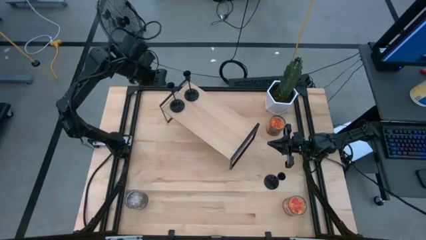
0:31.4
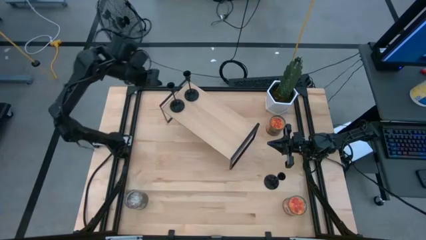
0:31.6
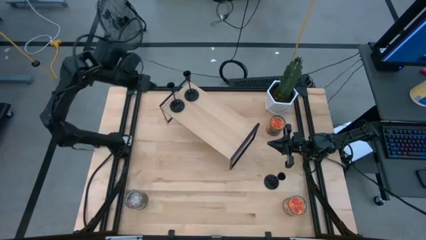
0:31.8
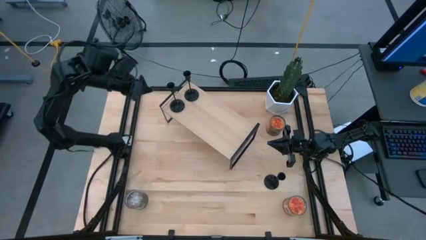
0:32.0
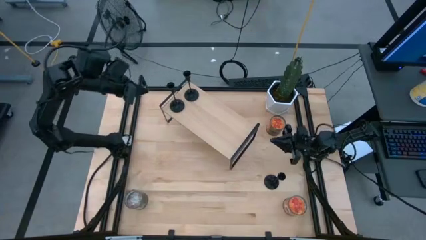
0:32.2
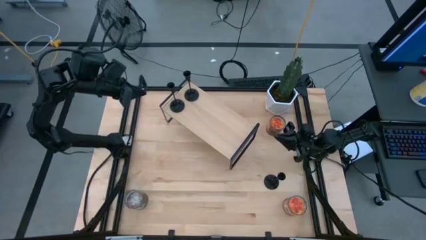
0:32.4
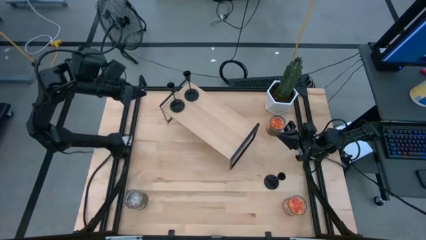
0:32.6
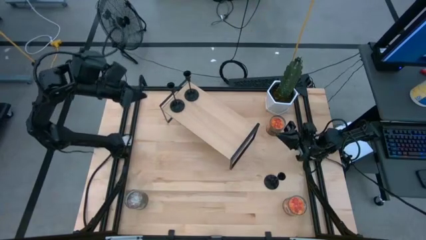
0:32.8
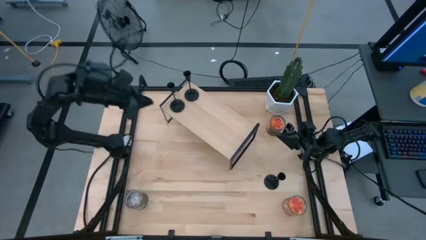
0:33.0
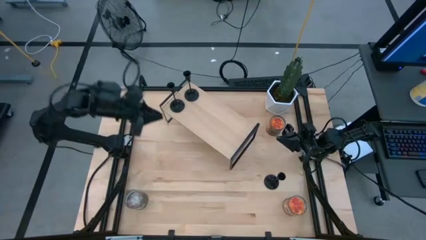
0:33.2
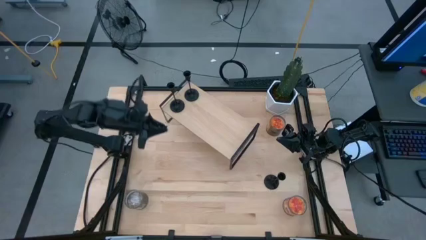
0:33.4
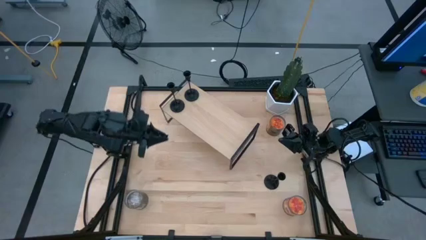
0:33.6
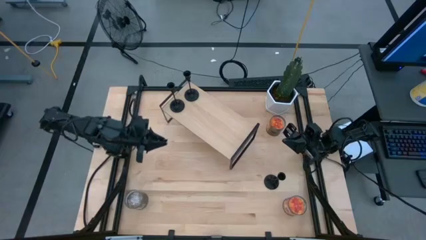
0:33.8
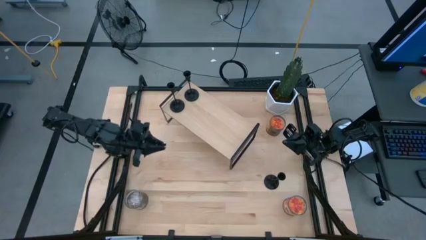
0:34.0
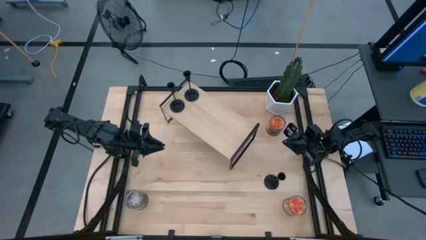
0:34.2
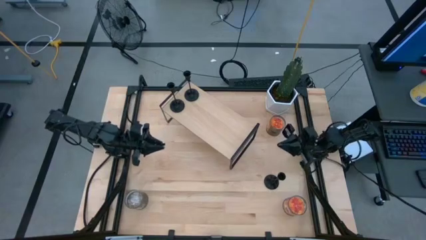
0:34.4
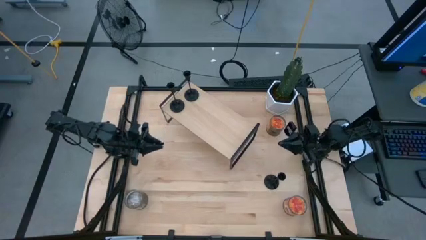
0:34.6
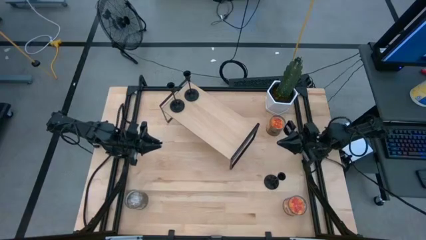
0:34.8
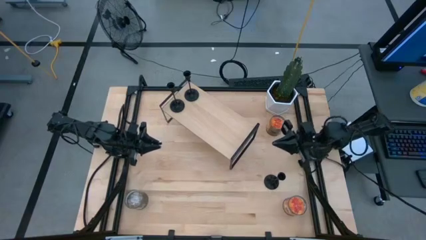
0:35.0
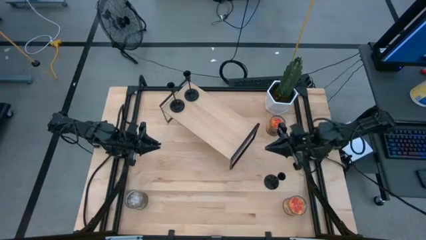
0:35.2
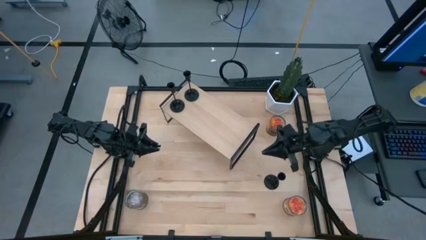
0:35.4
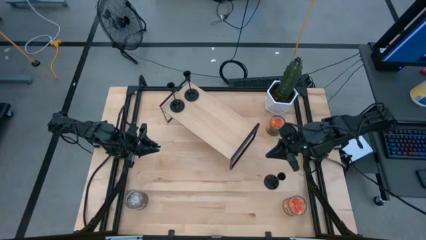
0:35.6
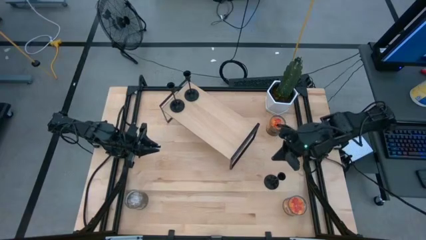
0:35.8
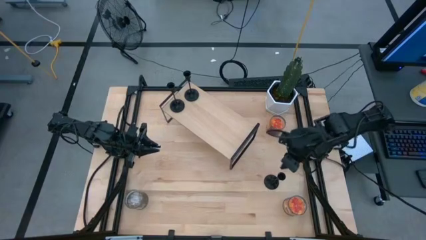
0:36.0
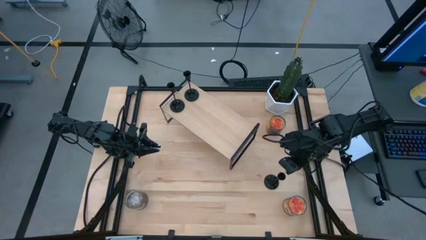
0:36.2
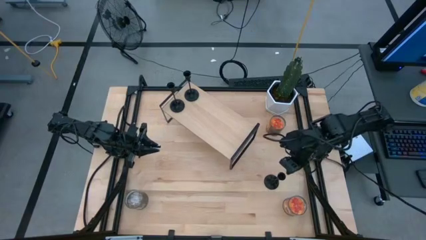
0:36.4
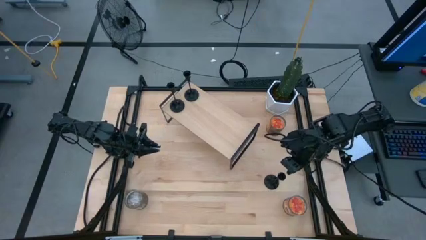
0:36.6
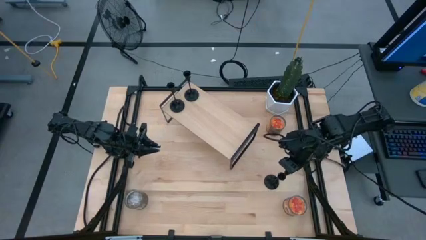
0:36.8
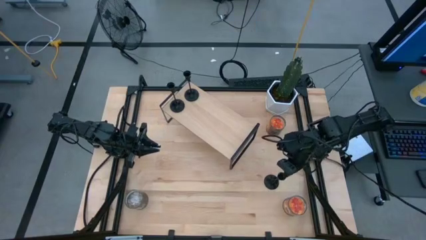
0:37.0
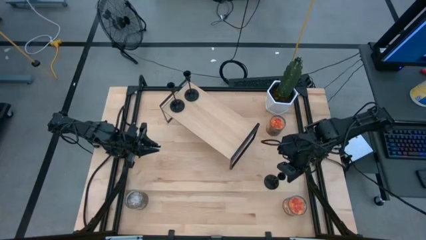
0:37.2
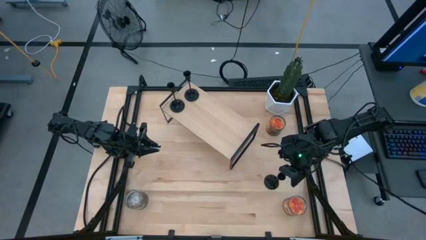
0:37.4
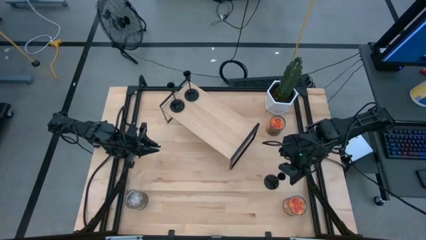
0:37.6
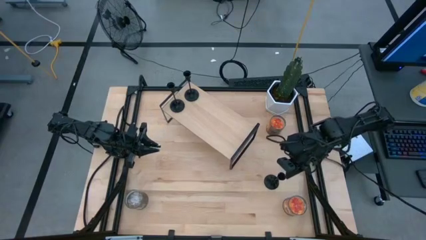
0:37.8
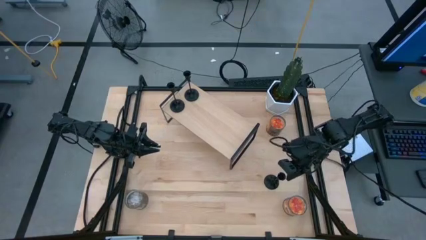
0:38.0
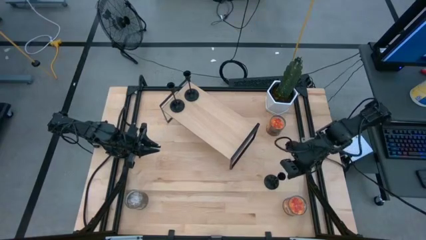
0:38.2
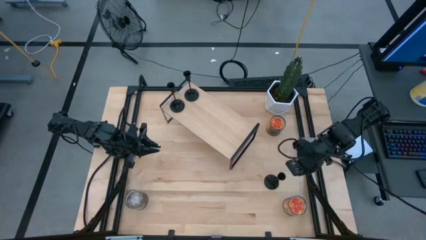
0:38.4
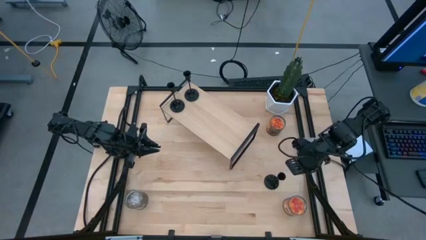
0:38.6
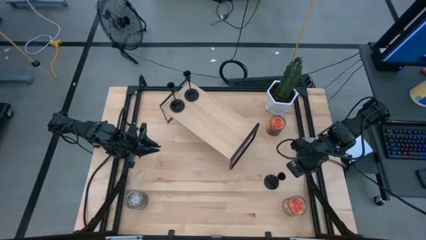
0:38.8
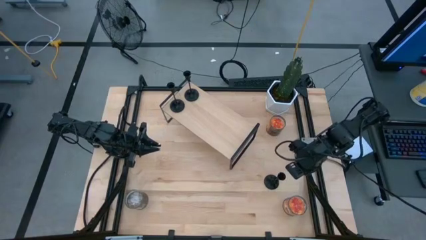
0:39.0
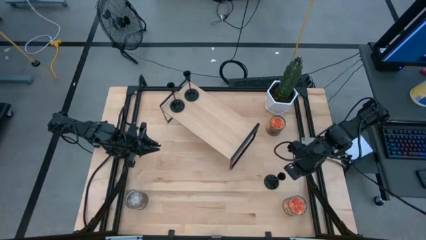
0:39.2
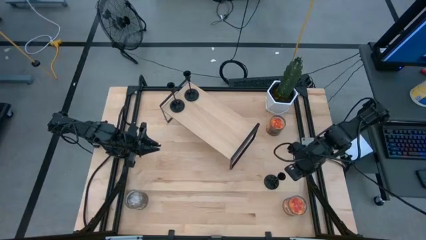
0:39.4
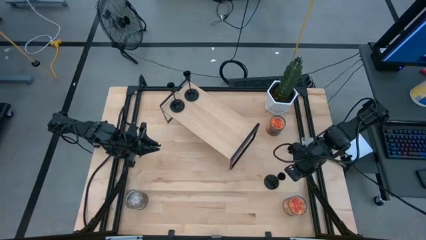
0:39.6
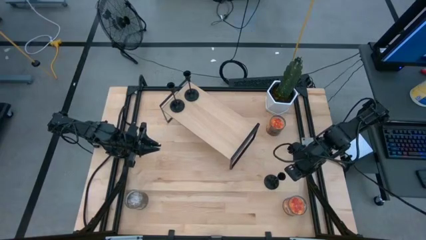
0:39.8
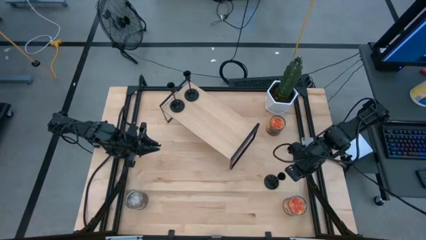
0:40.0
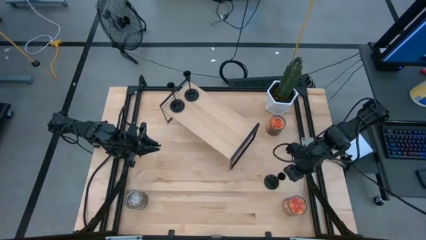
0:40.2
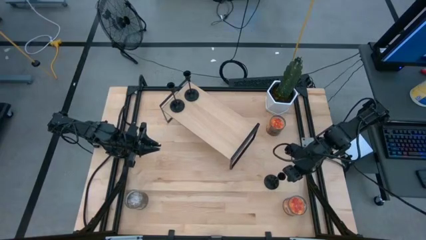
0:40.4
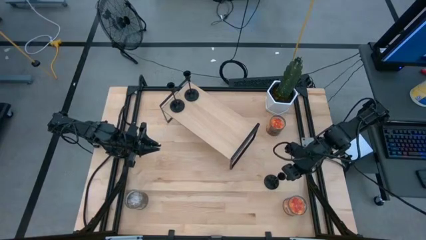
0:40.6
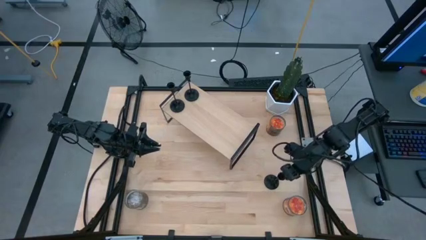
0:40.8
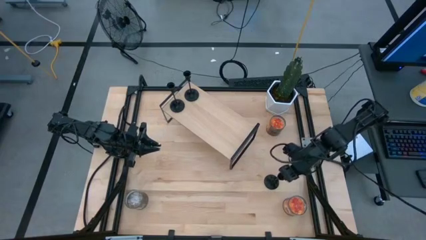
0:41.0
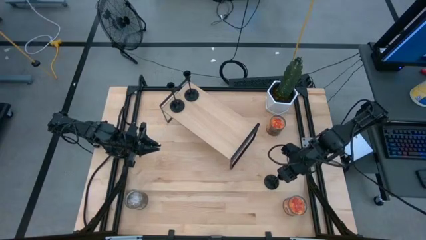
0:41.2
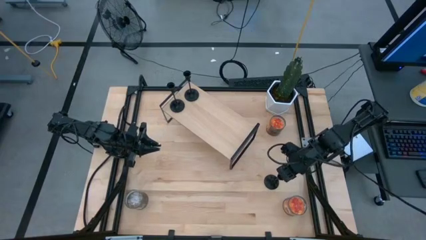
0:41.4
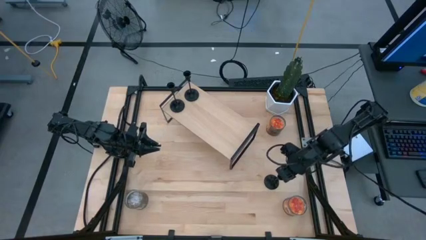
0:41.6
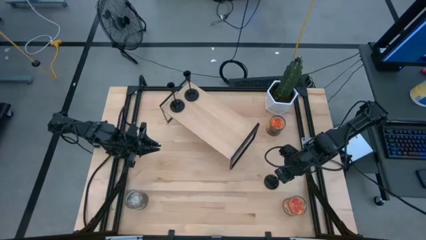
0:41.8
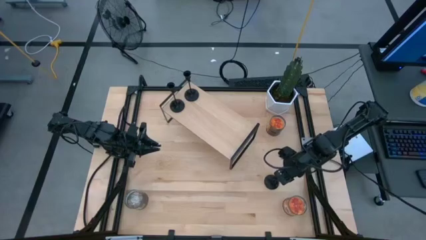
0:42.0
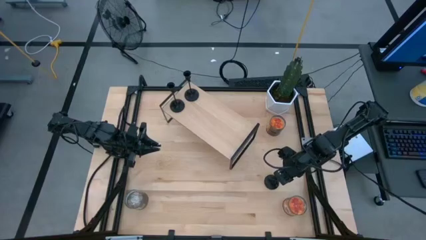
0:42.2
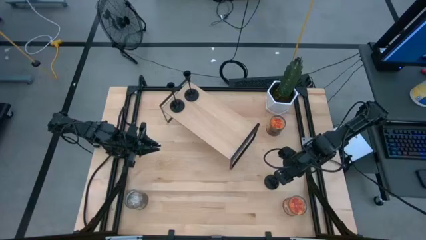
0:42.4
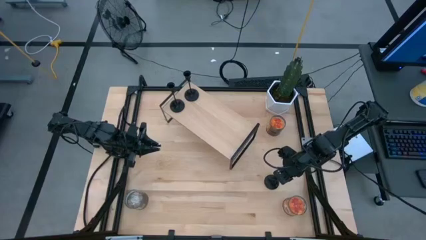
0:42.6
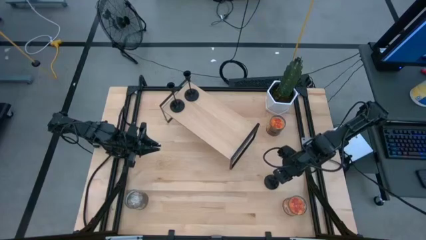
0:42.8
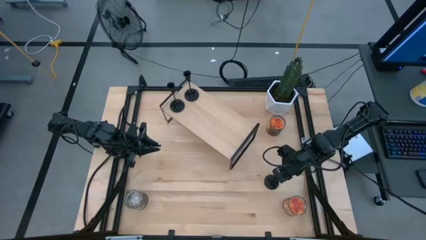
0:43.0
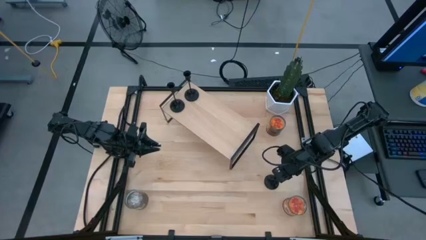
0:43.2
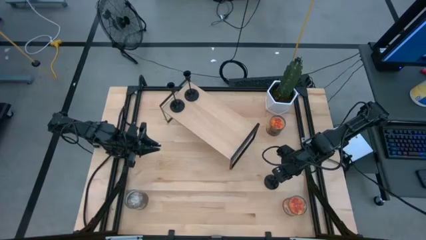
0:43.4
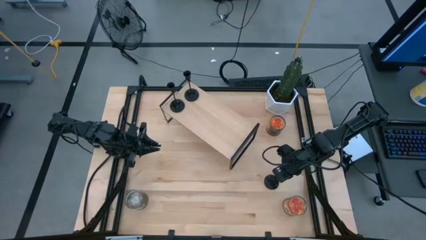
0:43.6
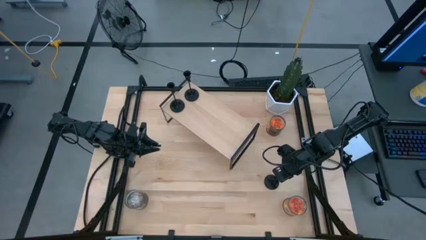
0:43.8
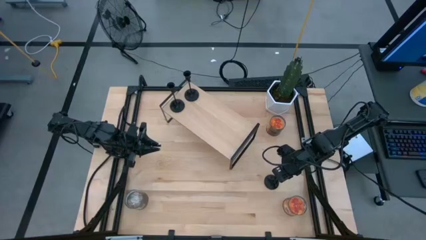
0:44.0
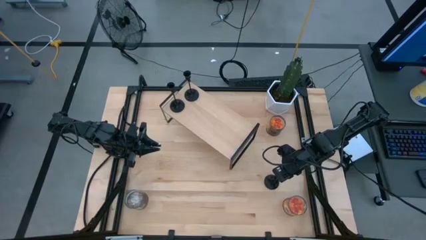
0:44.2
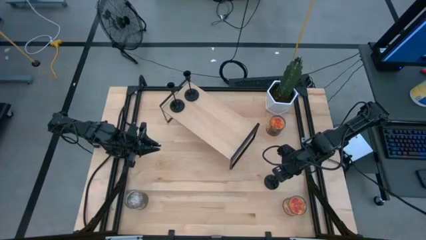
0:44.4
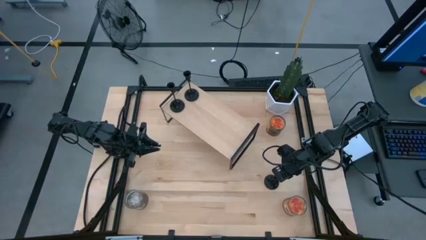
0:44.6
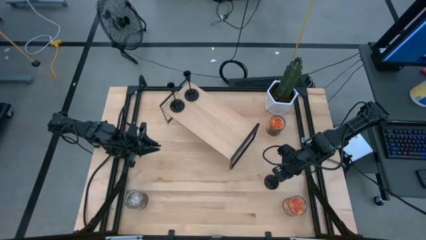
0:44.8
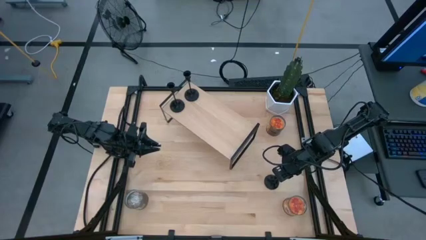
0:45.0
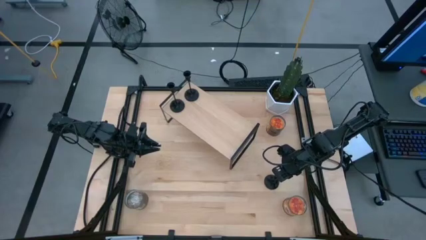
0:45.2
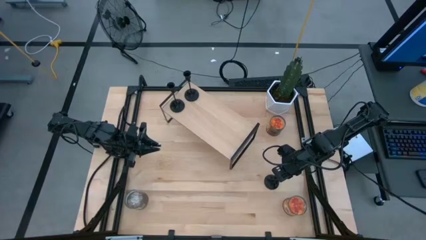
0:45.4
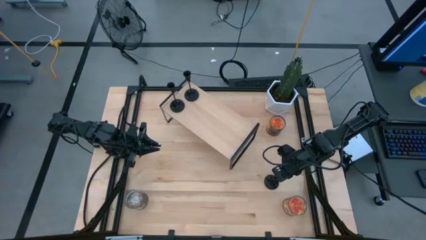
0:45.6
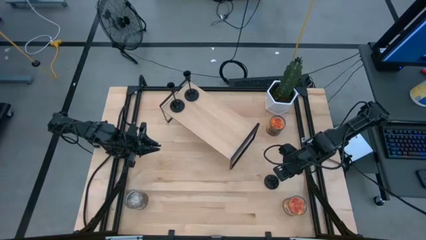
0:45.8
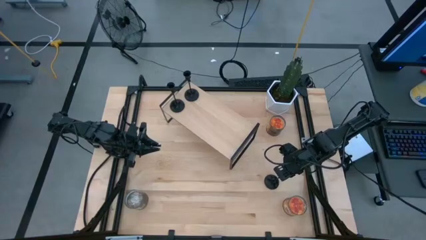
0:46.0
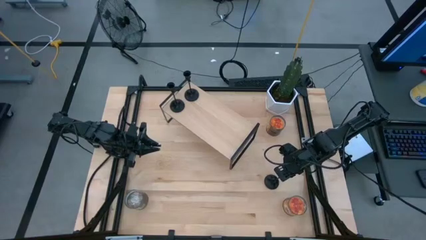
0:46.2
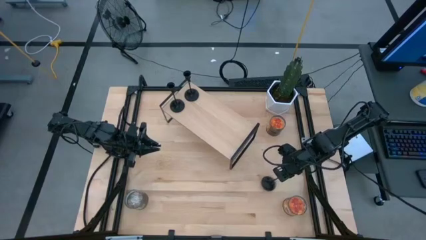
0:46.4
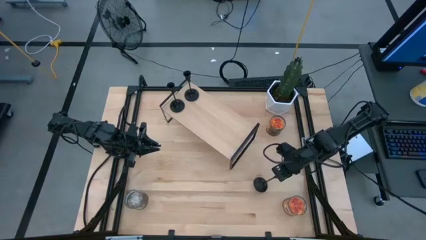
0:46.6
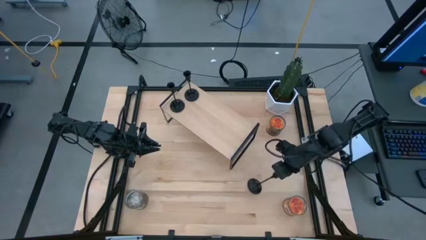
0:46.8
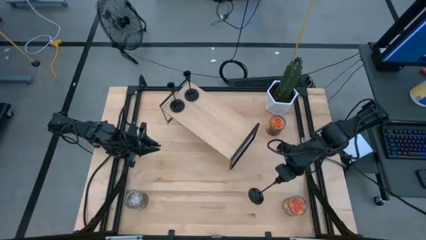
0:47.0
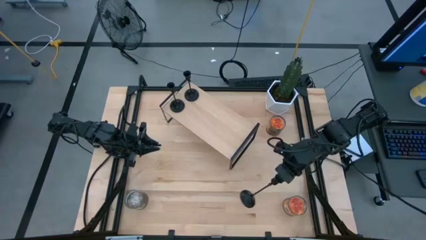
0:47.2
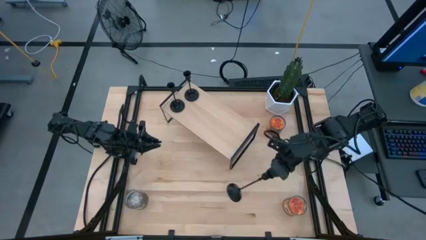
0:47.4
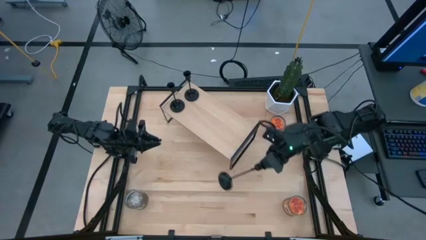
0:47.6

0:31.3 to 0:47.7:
Task: Pick & Place candle stick holders
Put the black candle holder on the shelf

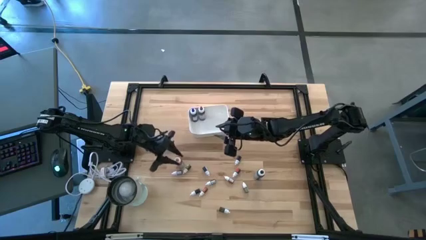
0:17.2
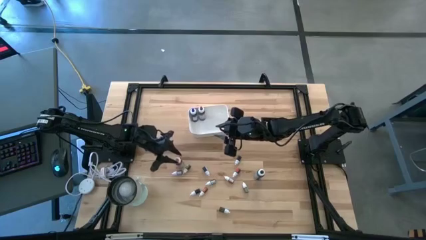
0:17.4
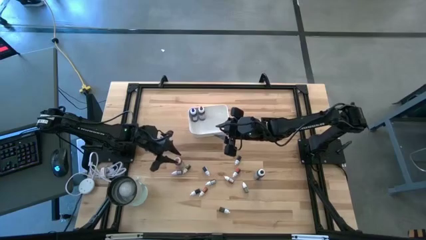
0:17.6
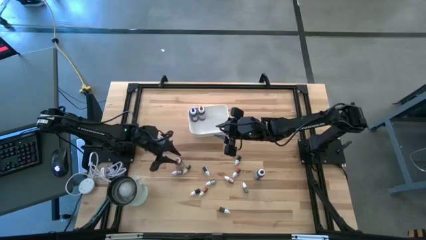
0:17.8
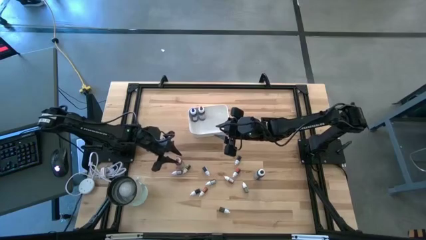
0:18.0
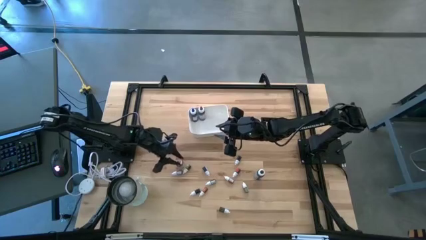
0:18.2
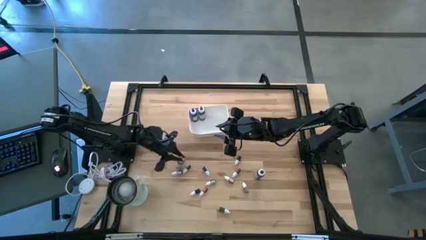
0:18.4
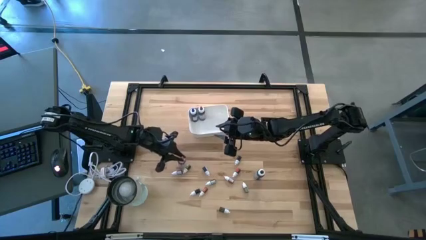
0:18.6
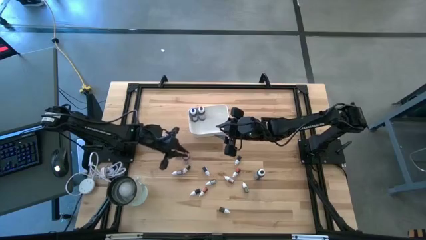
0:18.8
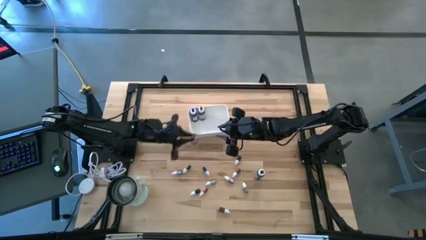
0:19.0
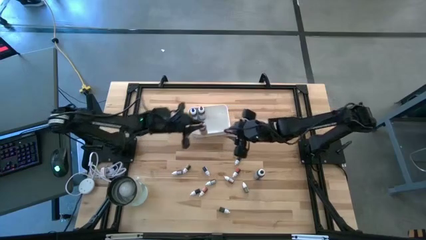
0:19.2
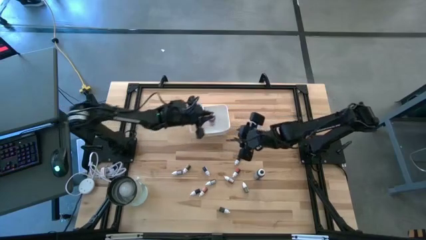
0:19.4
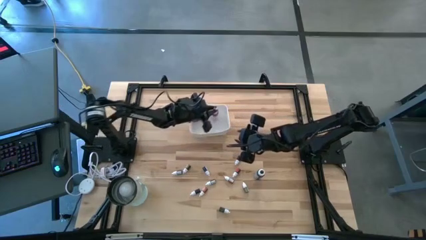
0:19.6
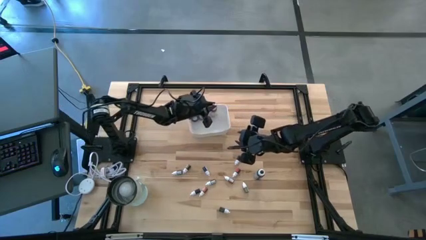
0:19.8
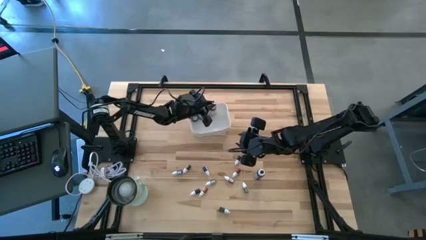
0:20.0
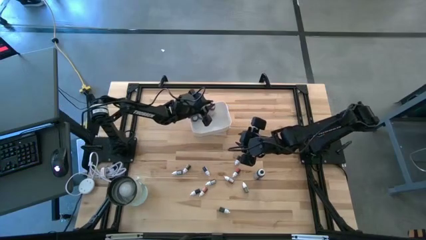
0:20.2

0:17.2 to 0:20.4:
Task: Pick & Place food coloring
Put the large pink food coloring bottle into the white bin
